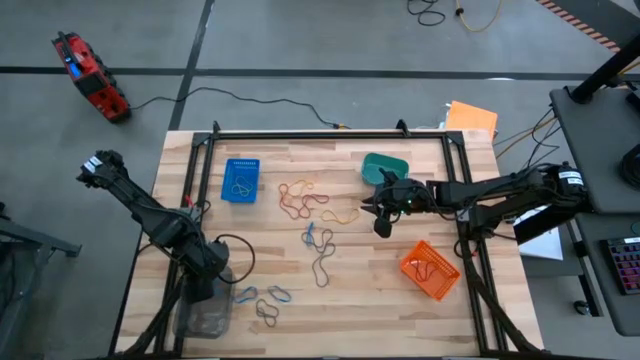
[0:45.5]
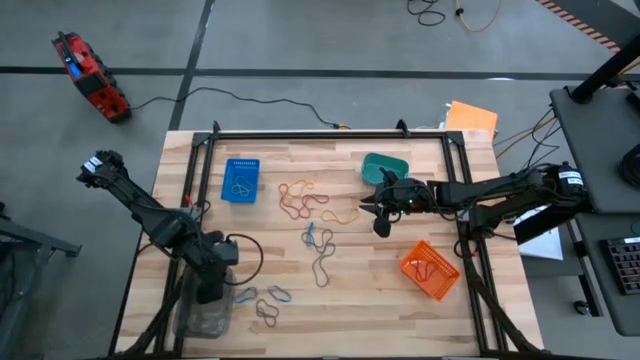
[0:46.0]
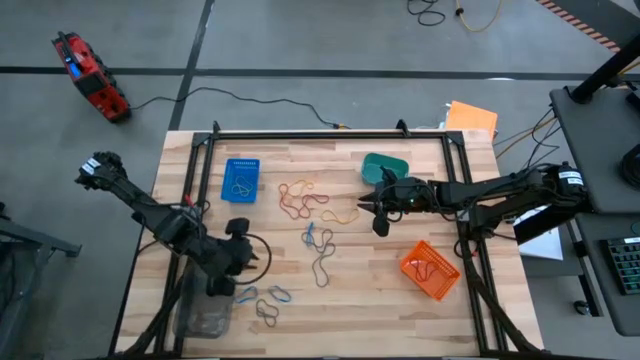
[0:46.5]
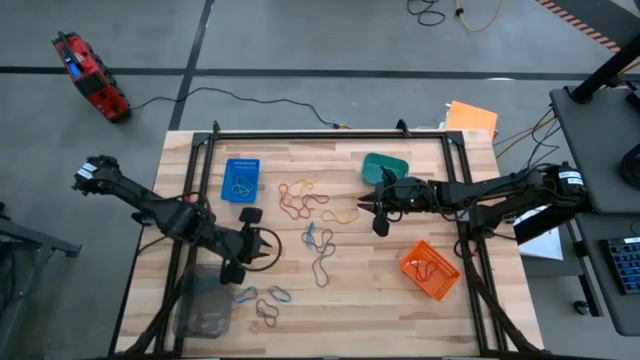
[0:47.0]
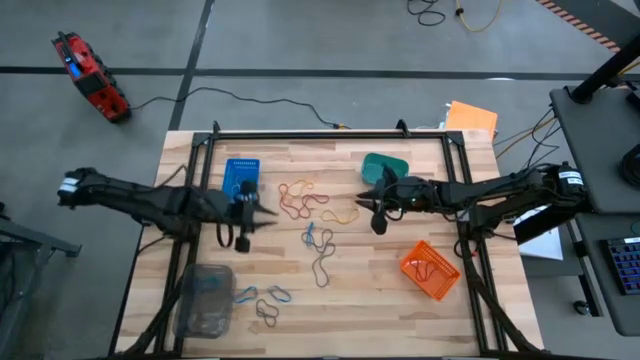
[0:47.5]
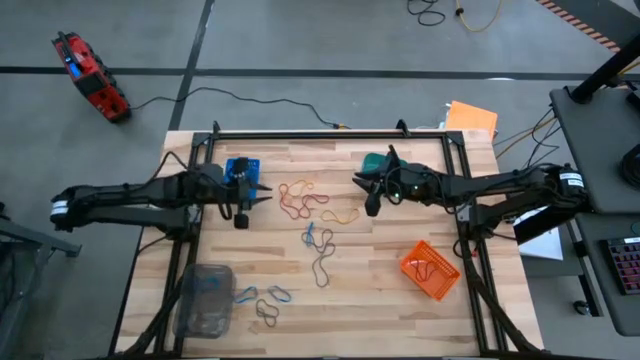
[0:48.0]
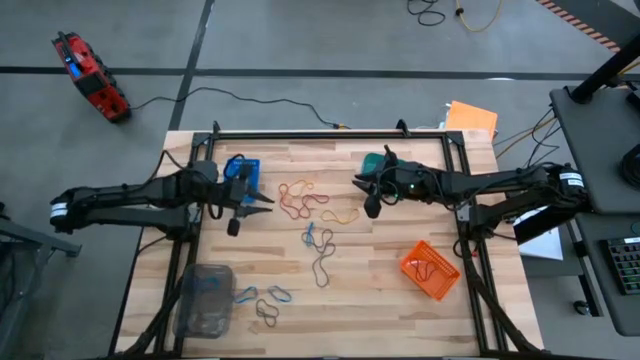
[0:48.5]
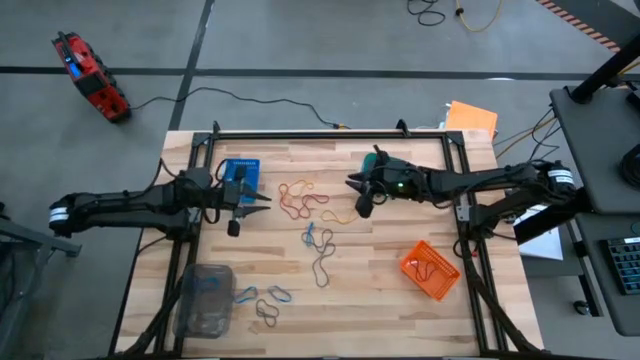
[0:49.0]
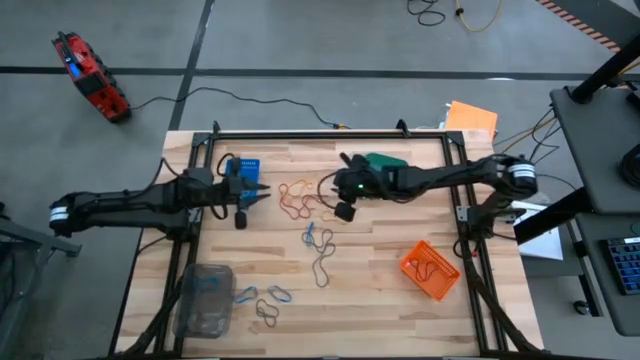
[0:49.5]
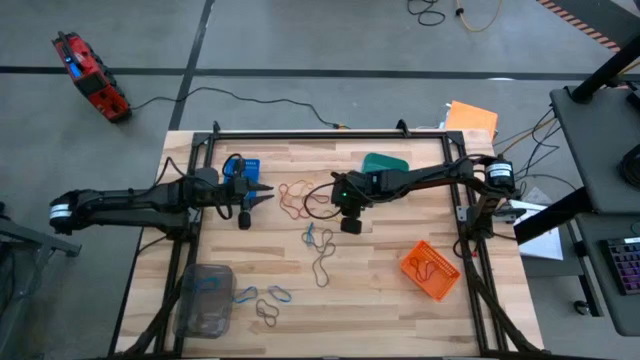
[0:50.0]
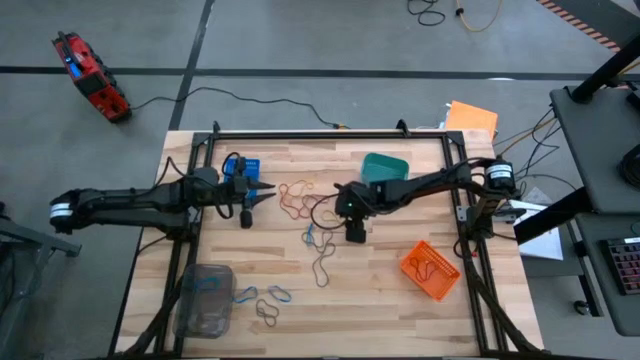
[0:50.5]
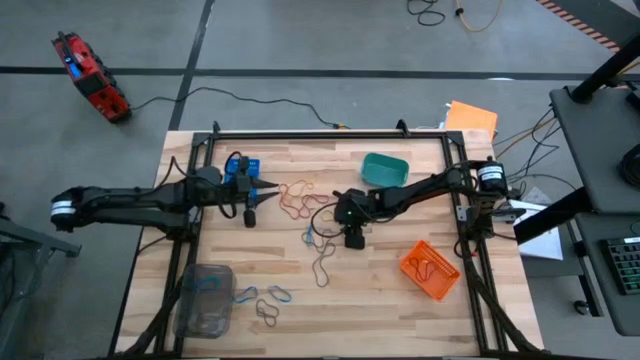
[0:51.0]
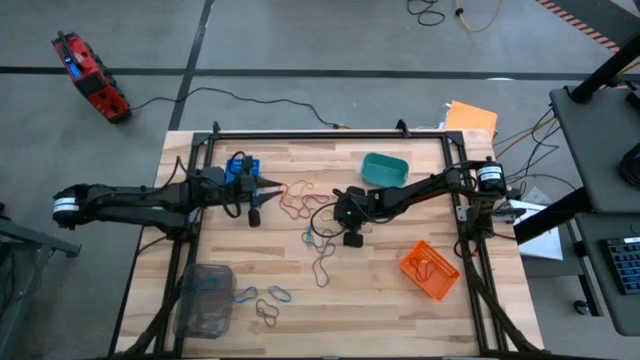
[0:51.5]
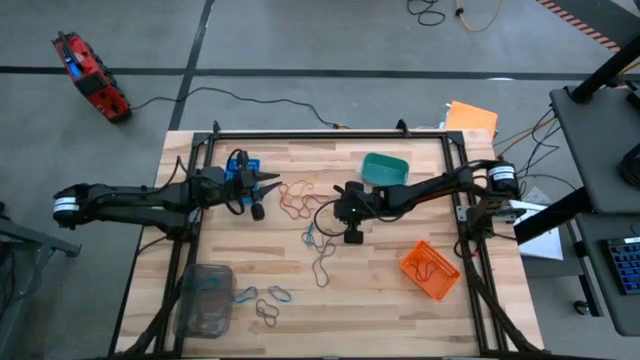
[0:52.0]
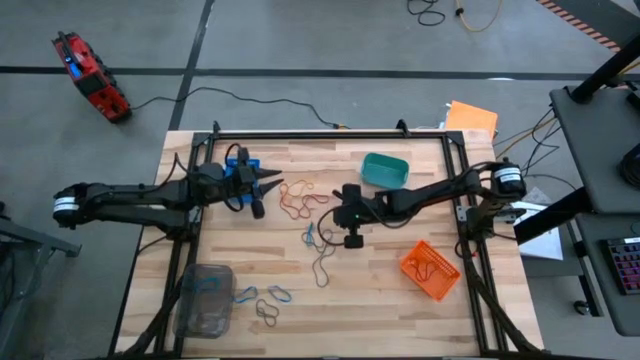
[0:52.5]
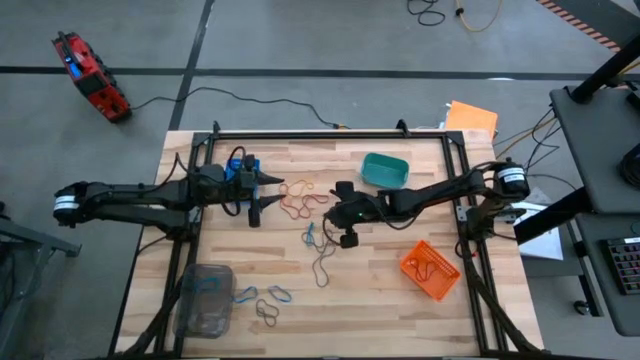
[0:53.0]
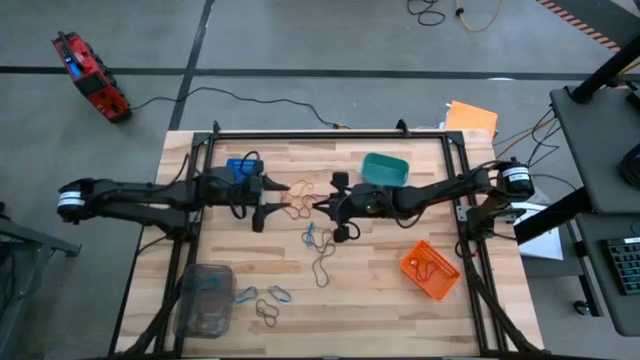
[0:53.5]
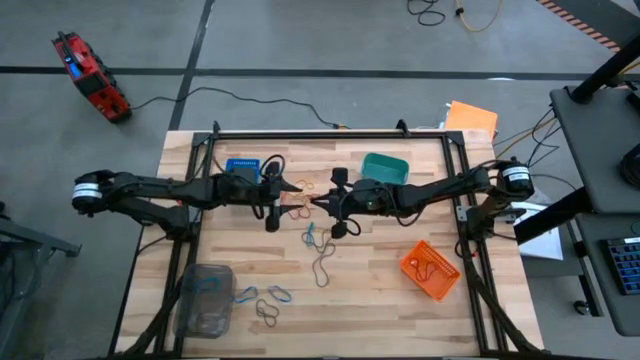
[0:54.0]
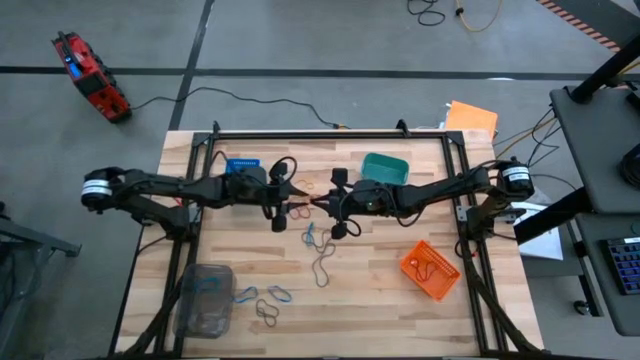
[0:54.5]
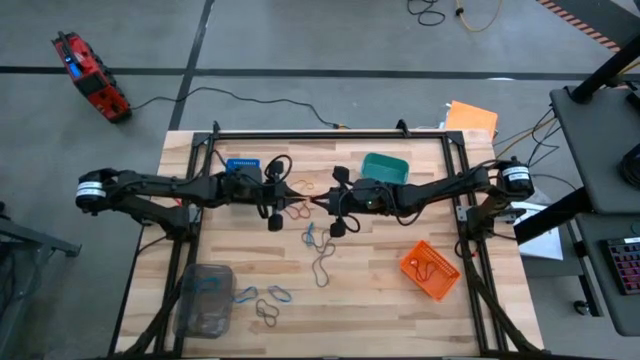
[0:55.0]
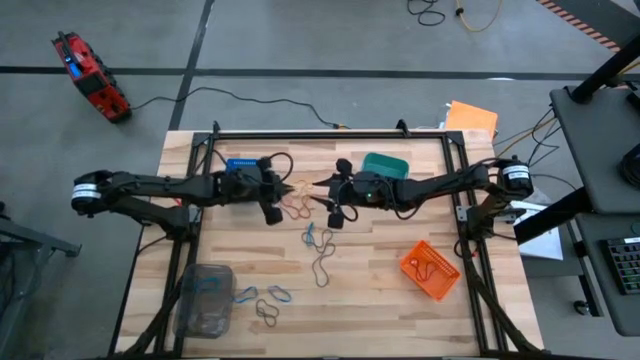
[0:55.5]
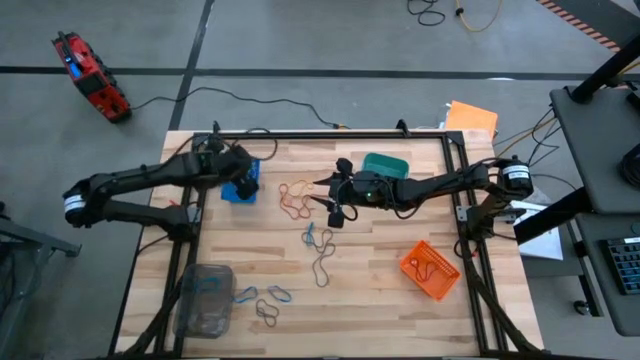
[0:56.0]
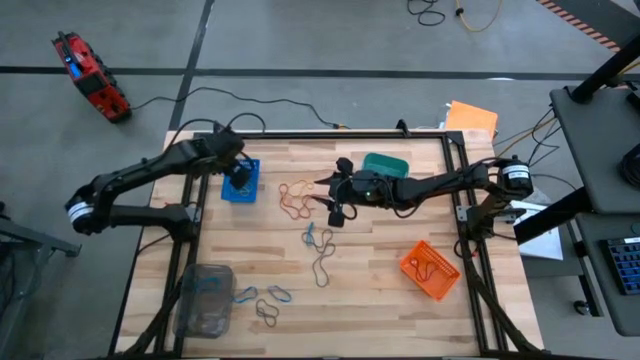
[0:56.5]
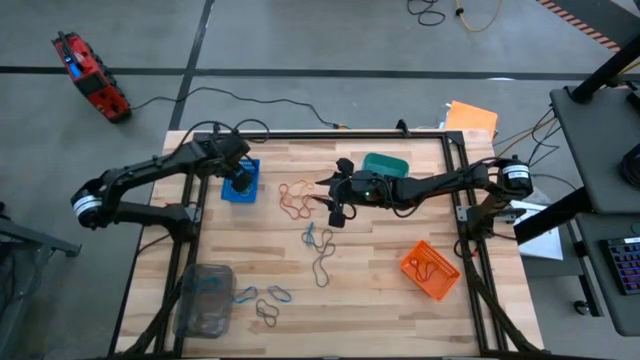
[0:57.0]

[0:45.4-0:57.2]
Task: Sort rubber bands into baskets
Put the yellow rubberband into the blue bin

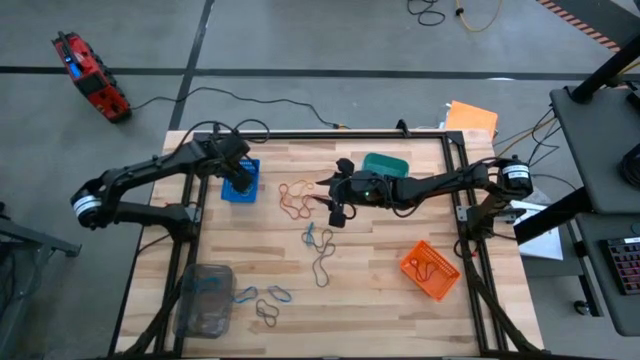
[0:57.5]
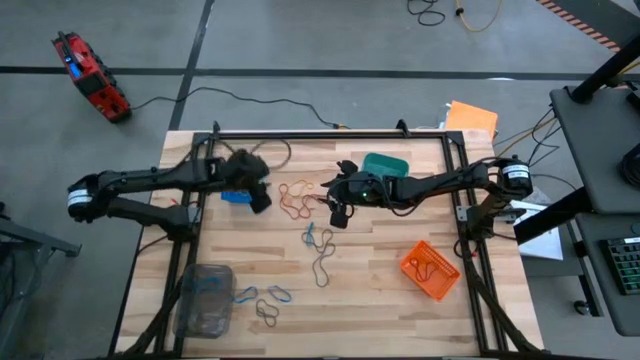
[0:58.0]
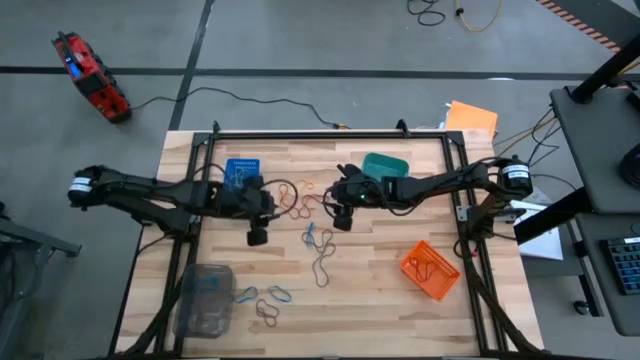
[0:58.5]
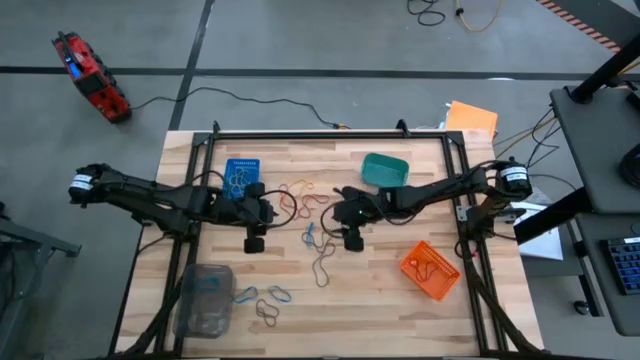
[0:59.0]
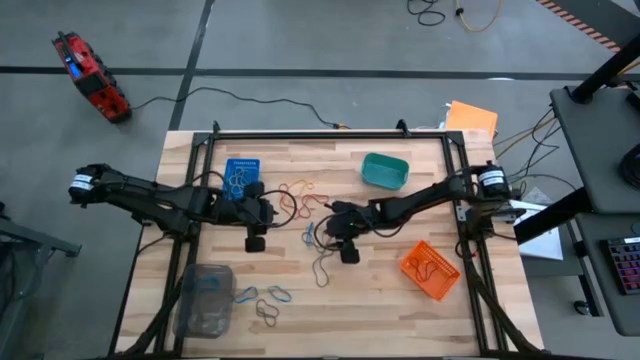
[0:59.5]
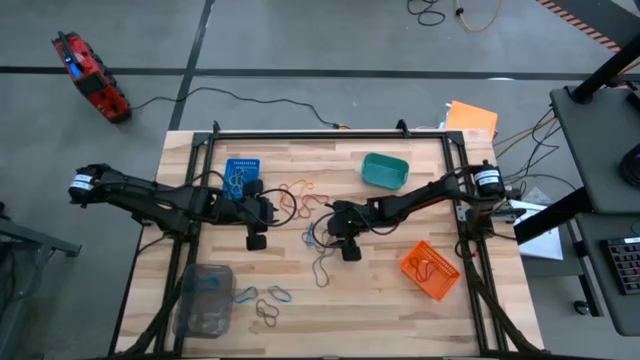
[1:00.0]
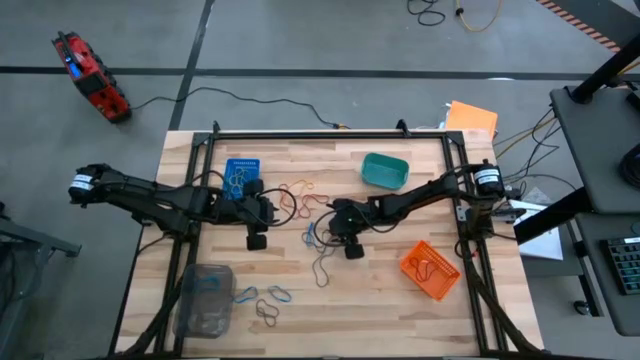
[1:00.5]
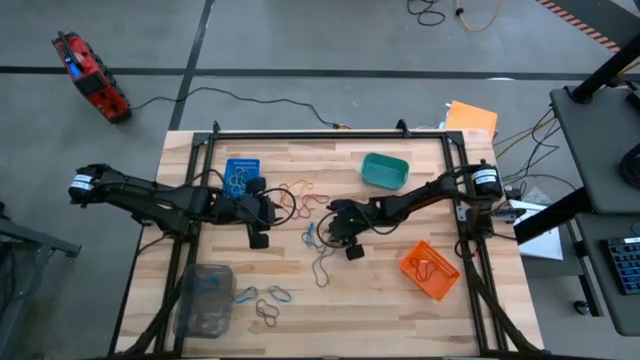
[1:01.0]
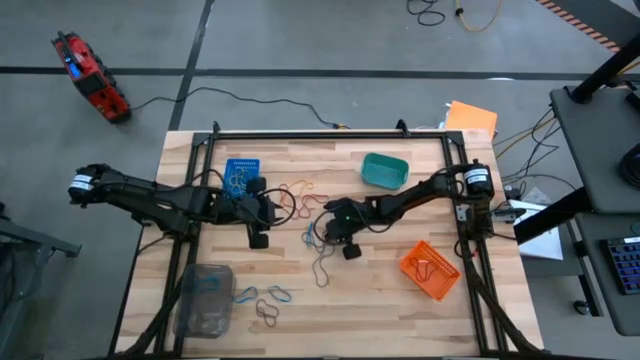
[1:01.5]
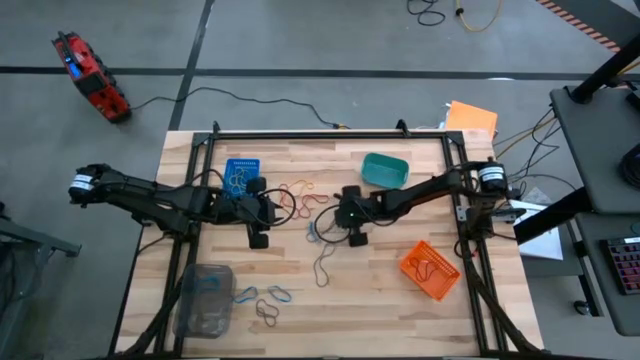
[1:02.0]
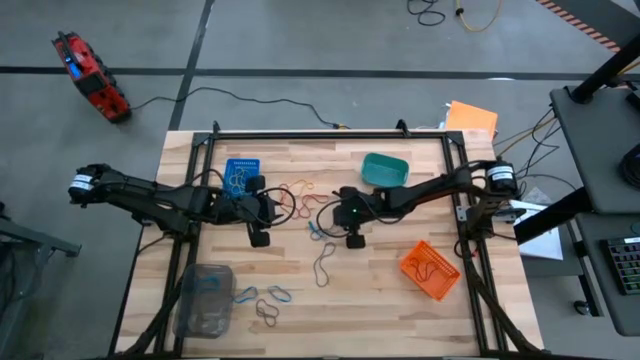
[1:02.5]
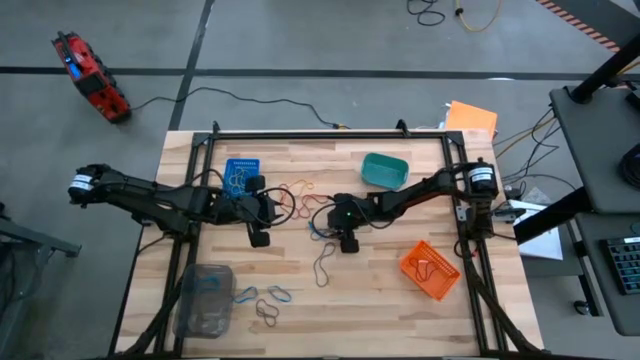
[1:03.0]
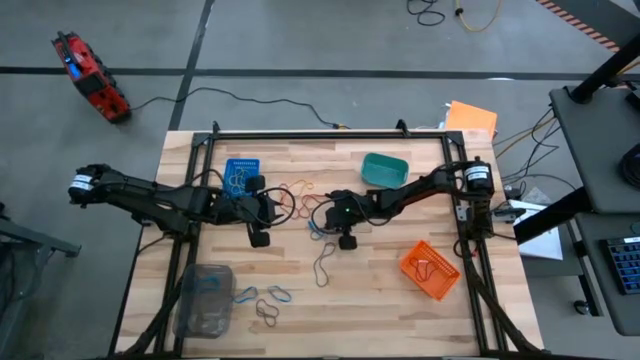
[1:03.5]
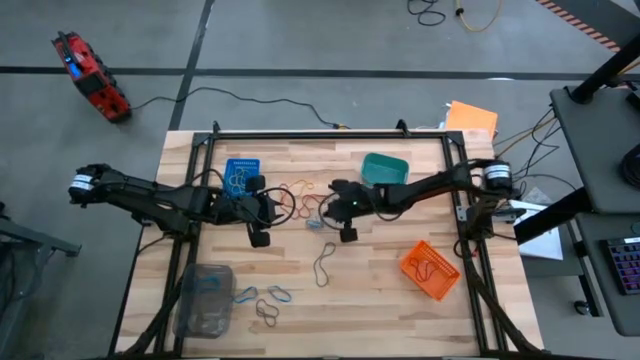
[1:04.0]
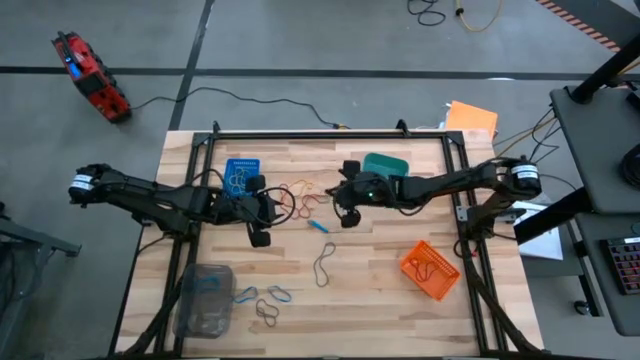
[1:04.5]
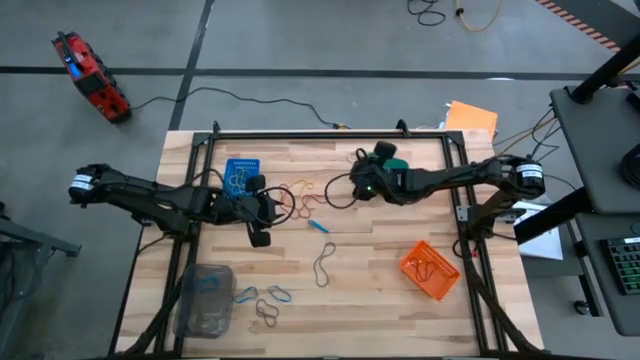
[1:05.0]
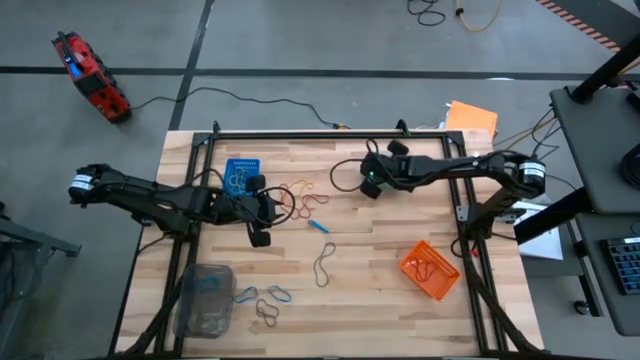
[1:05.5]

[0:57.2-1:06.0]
Put the violet rubberband into the green bin
